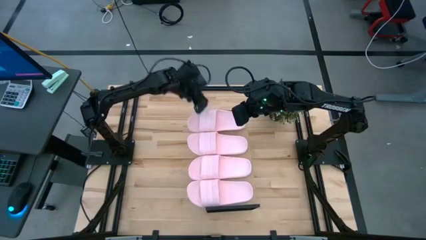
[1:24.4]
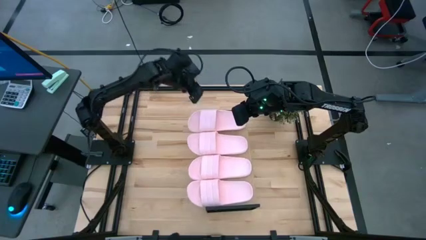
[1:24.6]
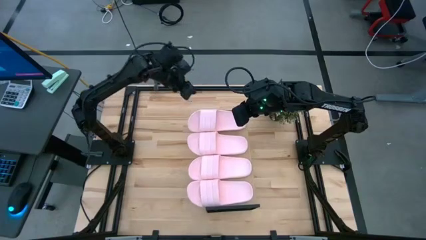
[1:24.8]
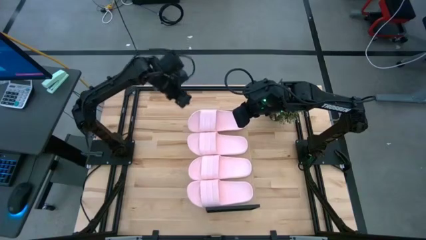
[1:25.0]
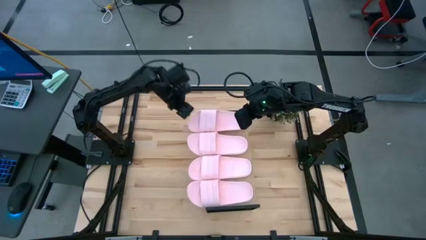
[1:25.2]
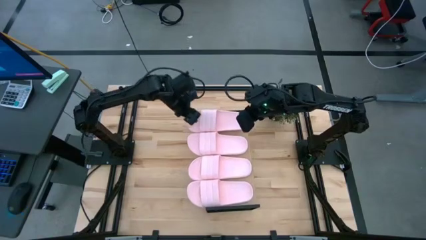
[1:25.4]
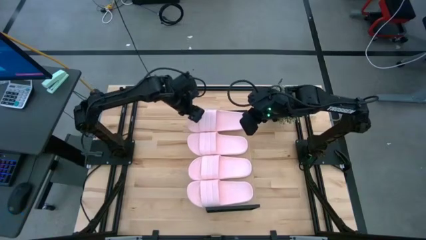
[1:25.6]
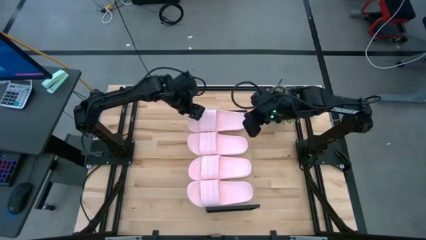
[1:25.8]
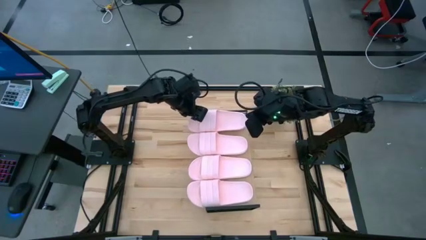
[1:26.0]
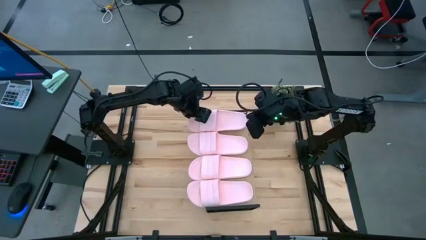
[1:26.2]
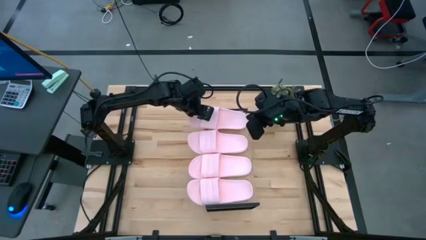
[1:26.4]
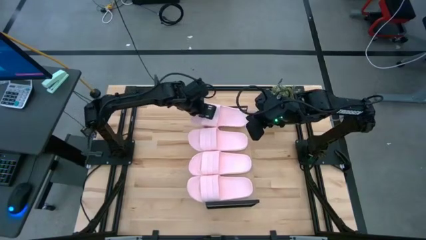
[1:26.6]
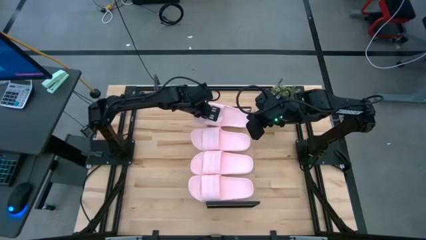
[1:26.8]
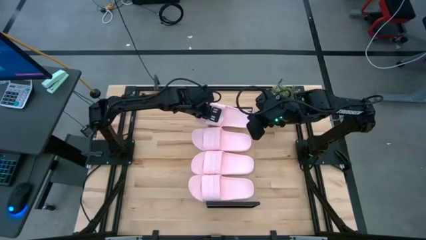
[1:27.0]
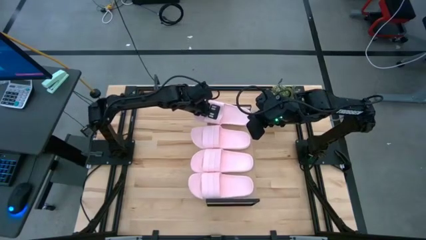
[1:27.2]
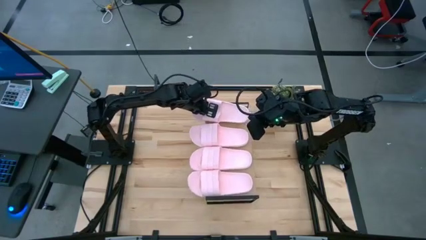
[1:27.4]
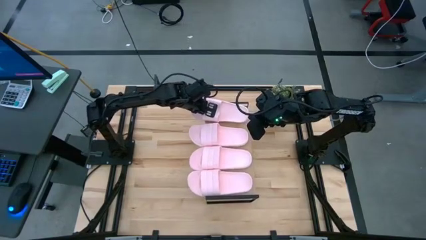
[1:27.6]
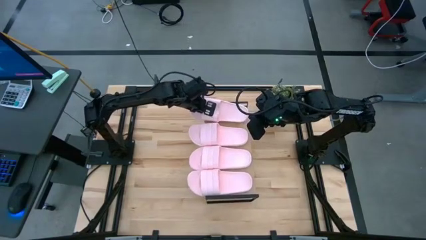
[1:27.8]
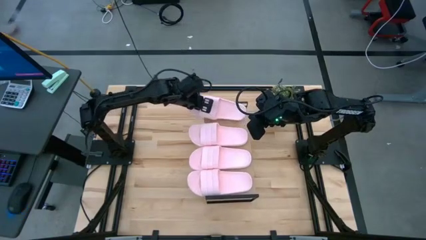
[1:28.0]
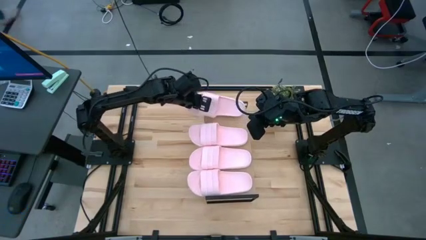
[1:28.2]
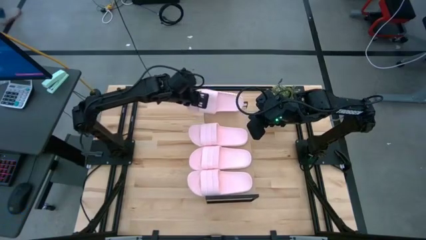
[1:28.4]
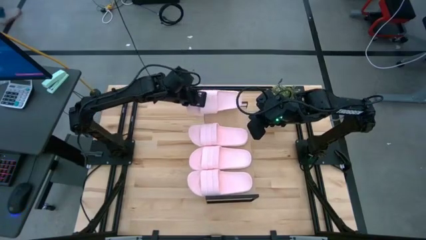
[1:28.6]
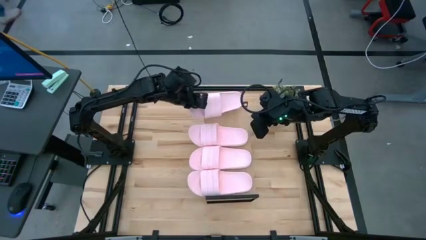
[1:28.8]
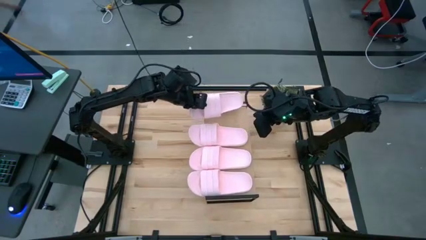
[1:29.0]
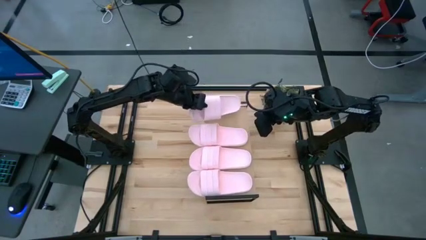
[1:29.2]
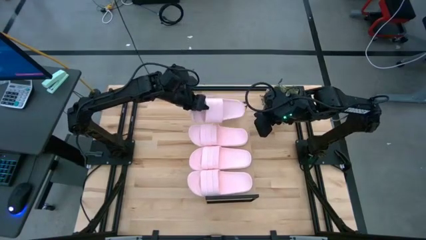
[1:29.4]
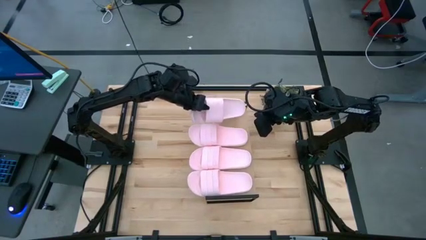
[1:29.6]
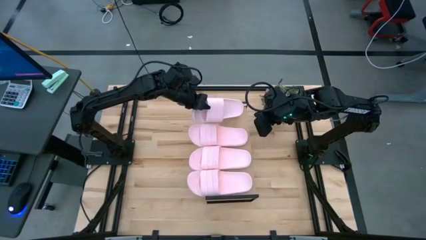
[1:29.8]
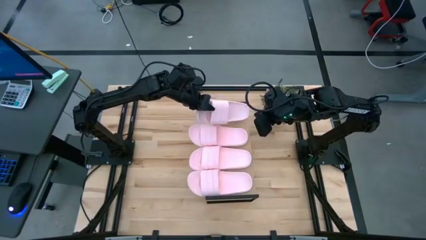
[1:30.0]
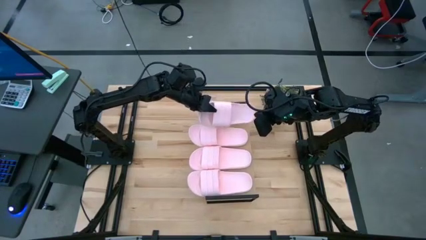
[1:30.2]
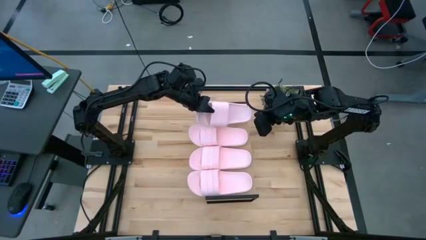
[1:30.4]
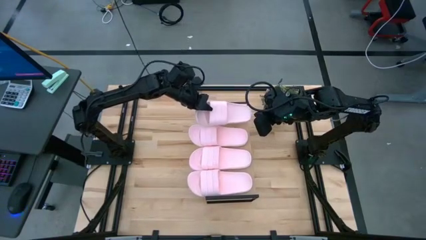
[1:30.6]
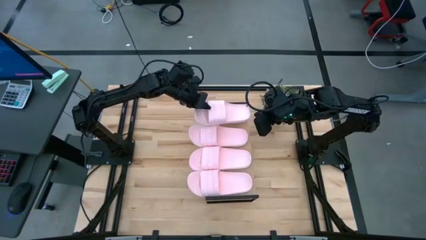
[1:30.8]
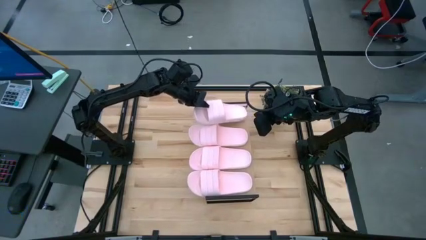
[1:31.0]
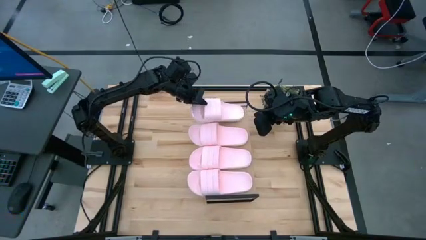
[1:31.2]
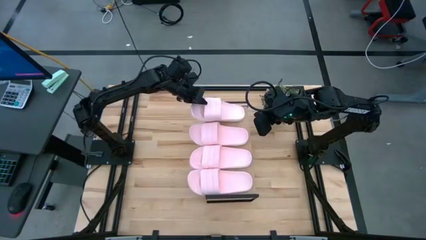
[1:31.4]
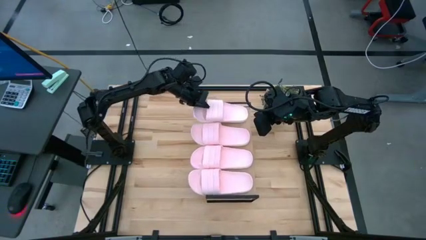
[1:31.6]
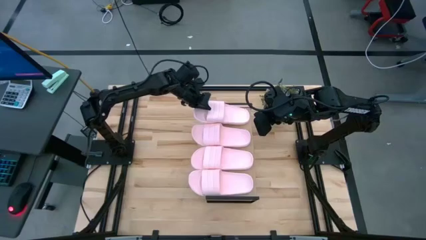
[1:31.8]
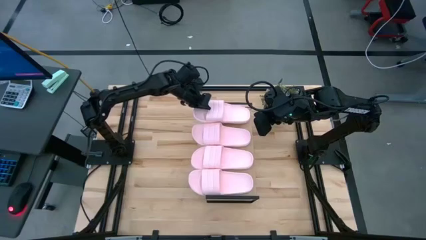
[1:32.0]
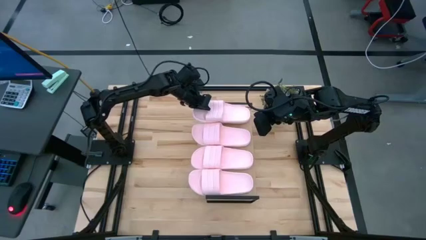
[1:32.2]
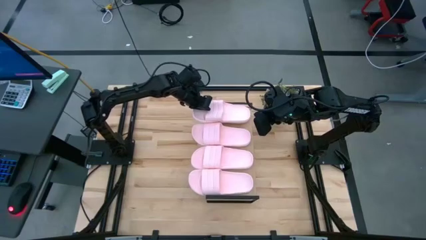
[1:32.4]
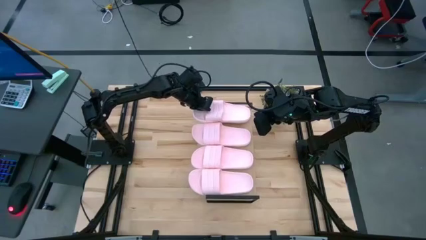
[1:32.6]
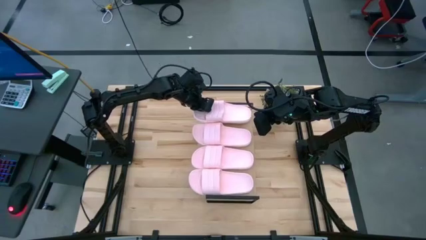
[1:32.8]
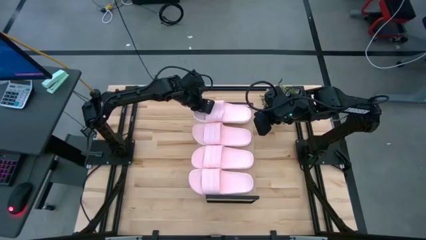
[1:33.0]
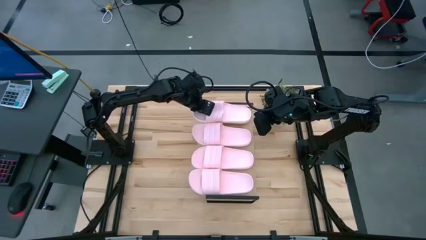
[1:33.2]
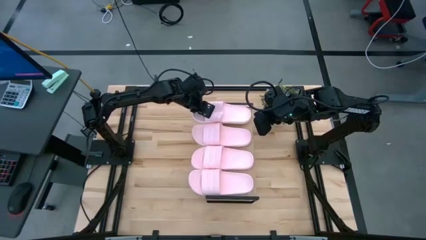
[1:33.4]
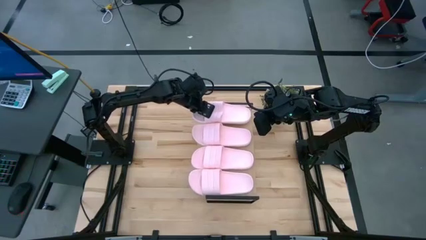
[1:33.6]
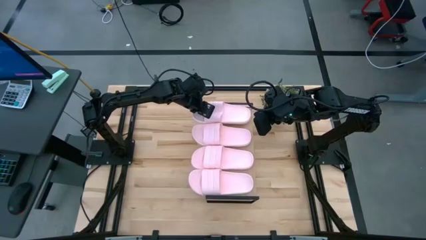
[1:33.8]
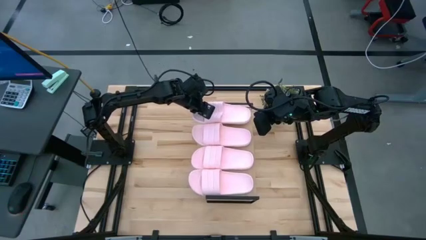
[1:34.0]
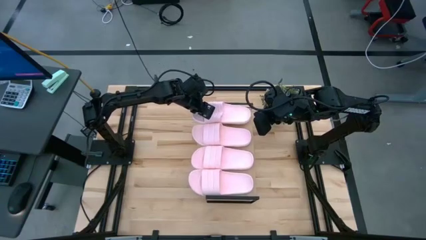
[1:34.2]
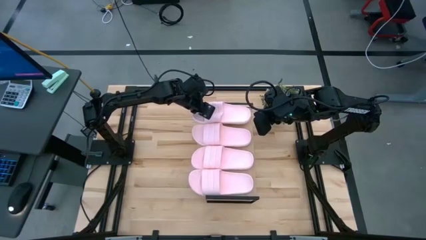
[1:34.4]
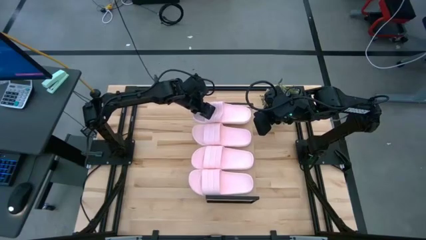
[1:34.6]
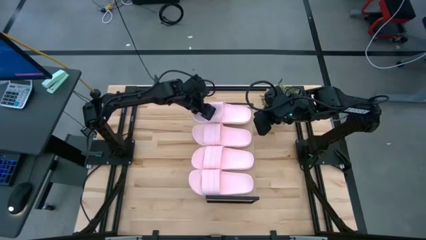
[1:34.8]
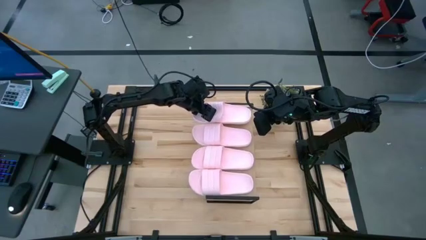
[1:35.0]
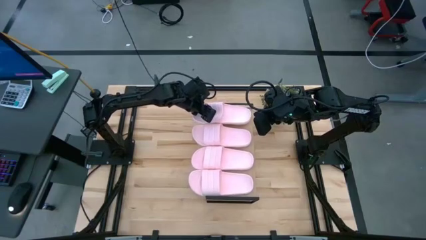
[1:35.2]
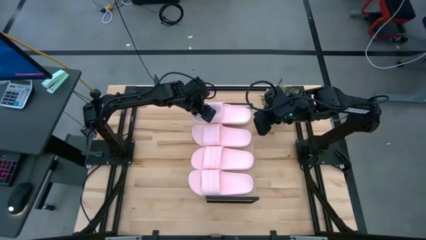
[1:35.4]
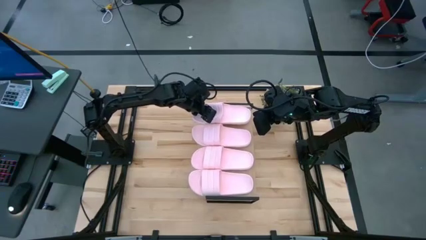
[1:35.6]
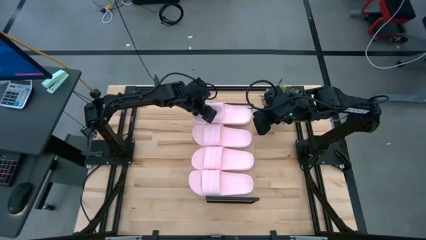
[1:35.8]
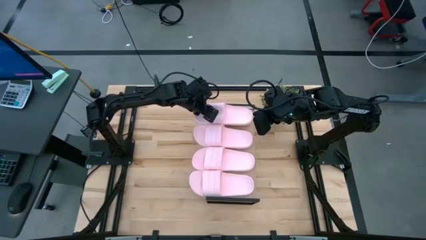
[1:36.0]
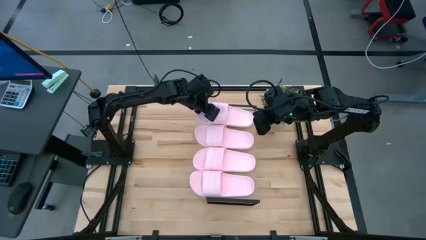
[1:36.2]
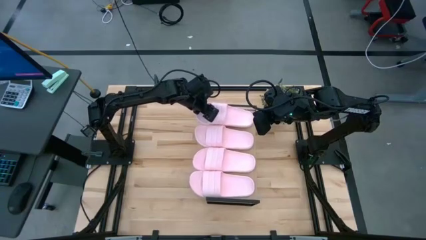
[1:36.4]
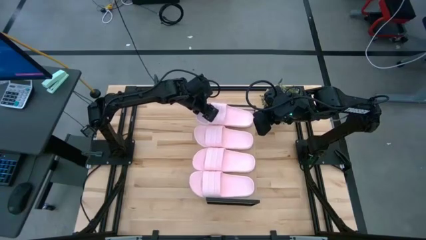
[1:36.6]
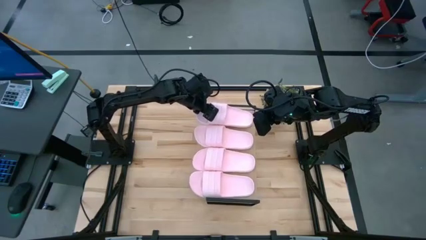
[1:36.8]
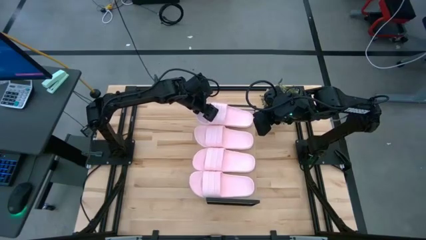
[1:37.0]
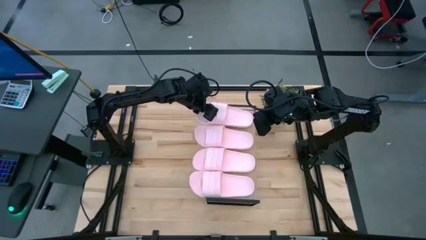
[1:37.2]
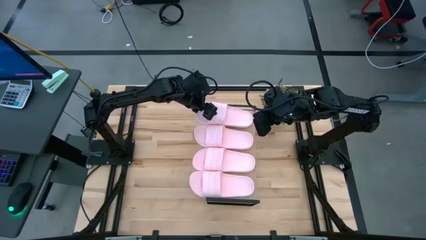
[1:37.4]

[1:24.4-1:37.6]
Task: Pick and place slides into the shelf
Put the pink slipper on the shelf
